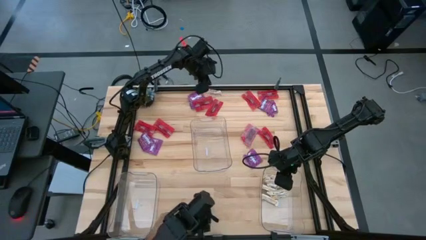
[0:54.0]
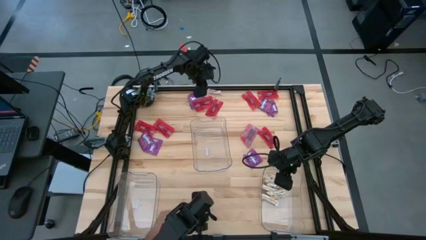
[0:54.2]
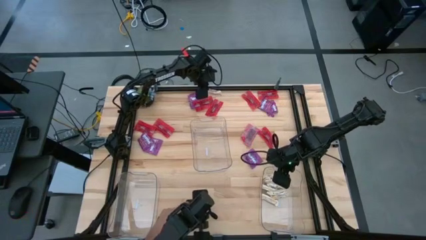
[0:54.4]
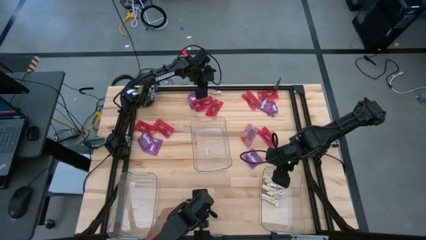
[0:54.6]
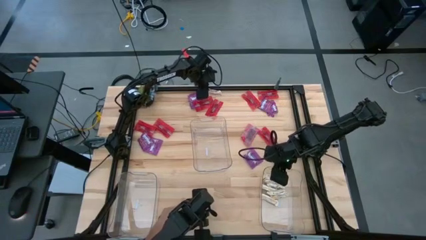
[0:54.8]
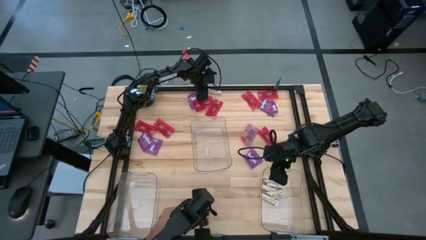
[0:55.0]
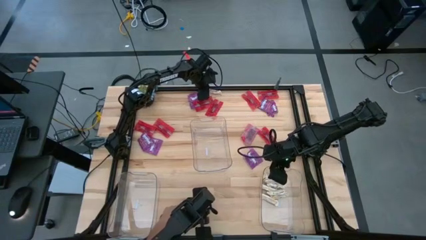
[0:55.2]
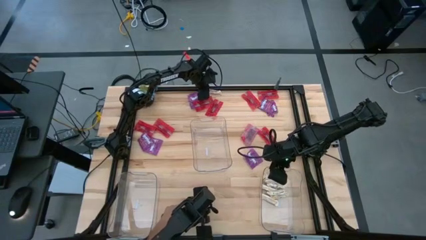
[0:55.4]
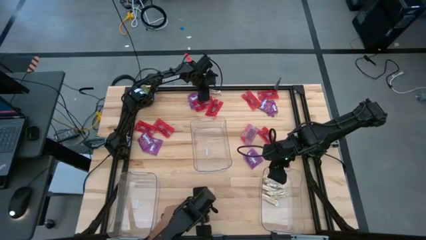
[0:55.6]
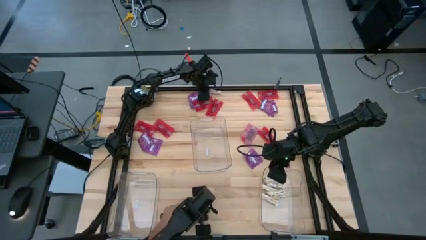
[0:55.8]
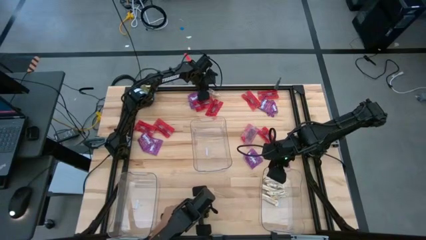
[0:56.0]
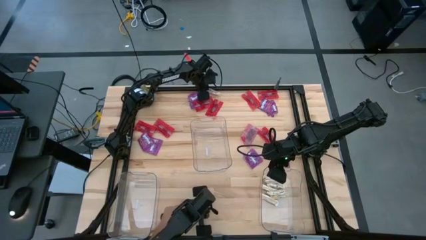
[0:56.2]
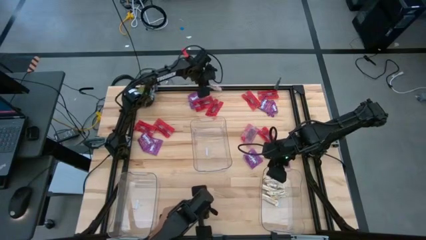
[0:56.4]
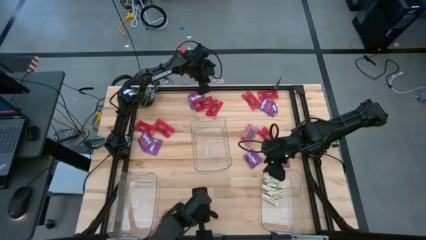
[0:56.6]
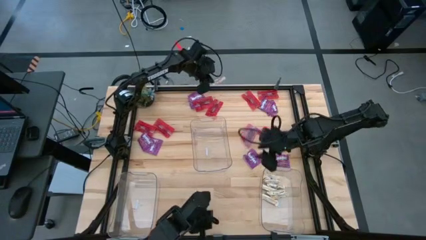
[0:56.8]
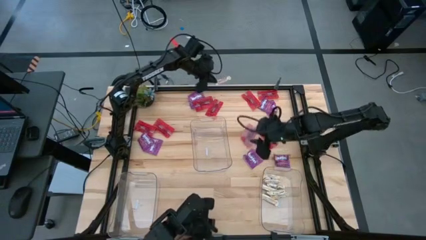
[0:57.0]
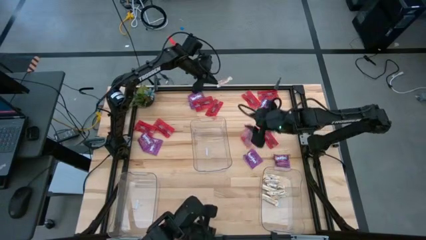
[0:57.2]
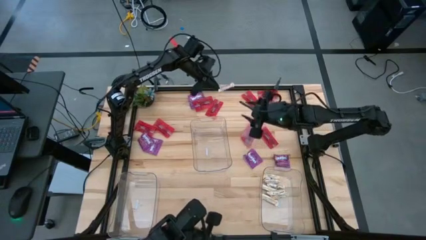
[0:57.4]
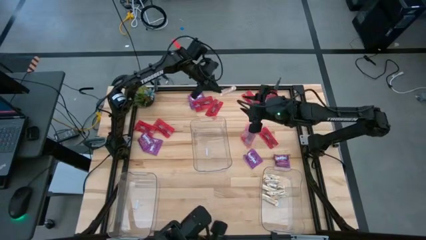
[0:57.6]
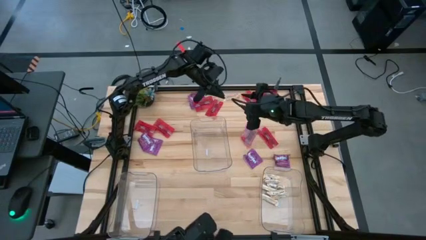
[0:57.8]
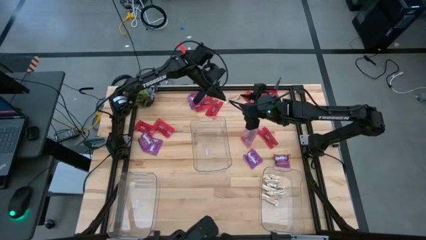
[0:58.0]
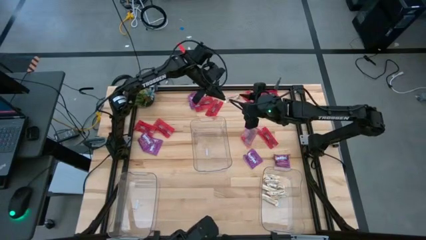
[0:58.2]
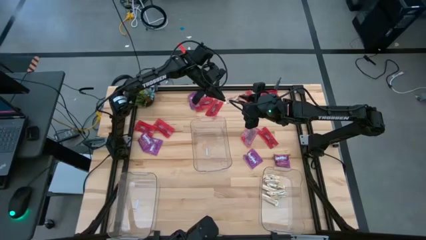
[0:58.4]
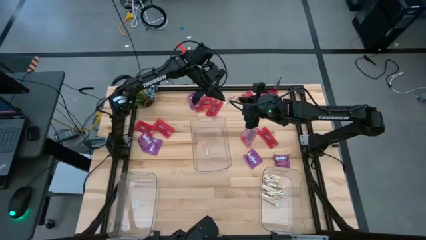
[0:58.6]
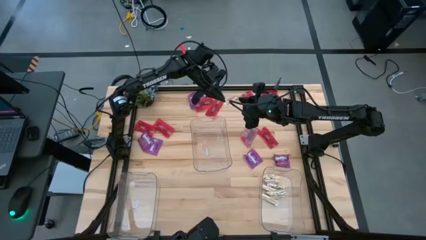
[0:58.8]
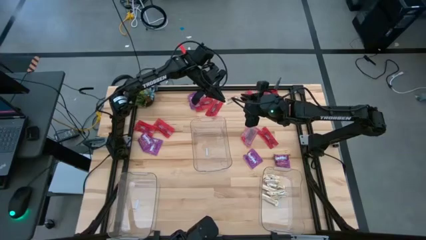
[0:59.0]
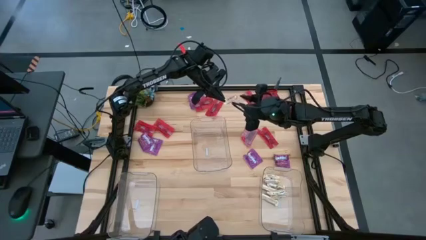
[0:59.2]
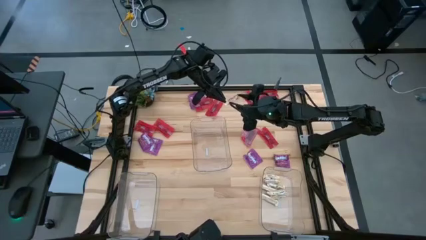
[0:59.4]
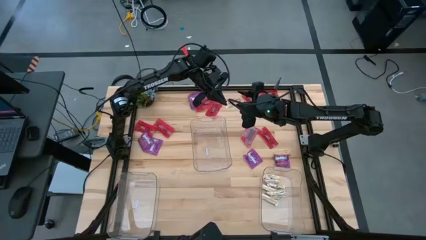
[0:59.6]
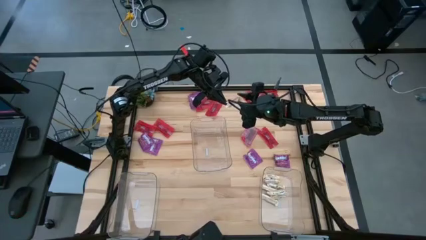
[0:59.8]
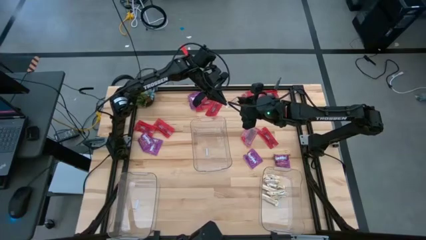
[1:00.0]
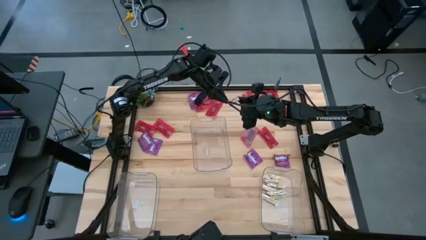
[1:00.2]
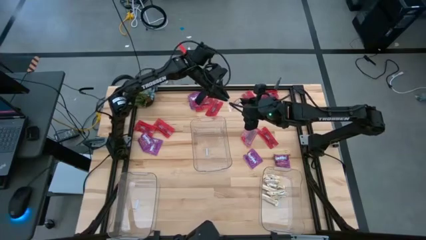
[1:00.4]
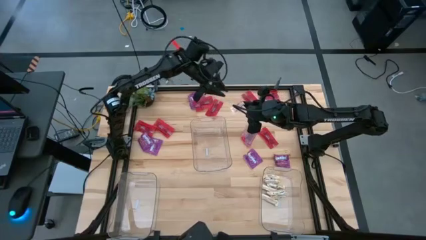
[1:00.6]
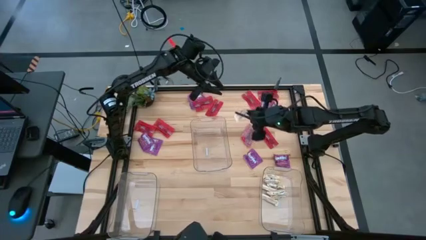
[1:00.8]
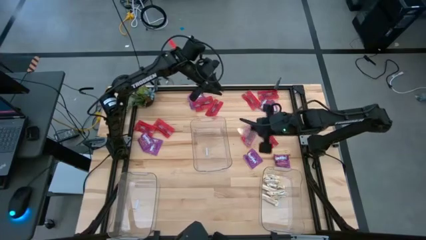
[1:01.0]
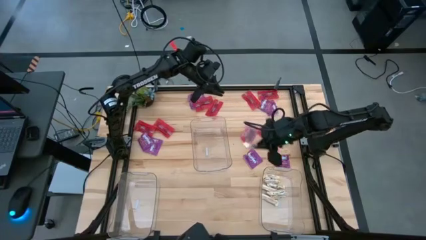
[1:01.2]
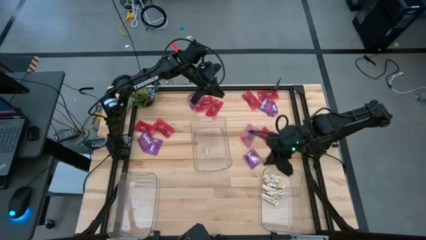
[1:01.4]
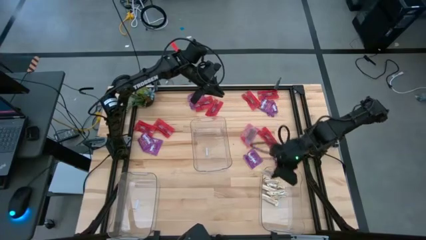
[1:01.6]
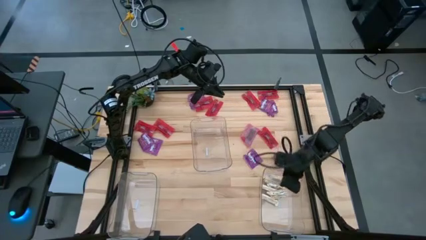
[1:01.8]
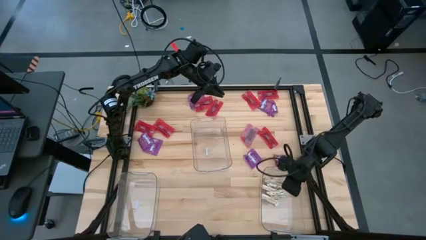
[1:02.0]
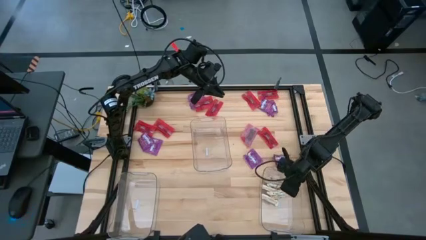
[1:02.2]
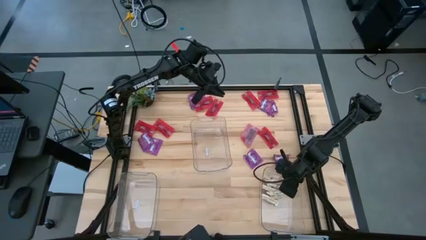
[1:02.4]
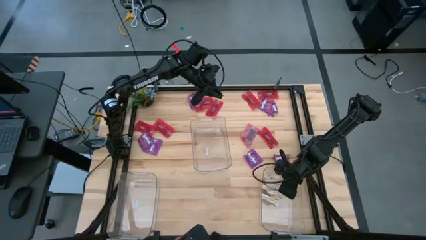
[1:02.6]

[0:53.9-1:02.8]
Task: Sort candy
Put the white chocolate bar into the right transparent bin

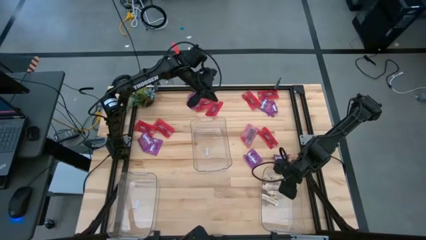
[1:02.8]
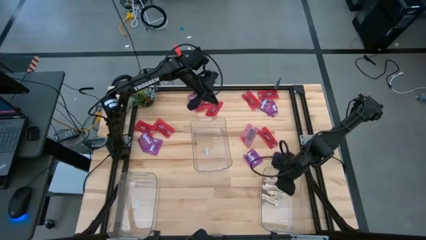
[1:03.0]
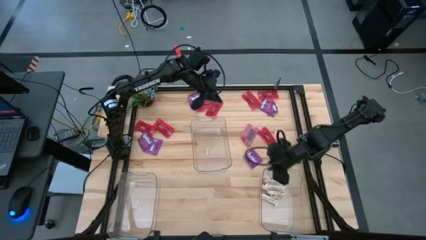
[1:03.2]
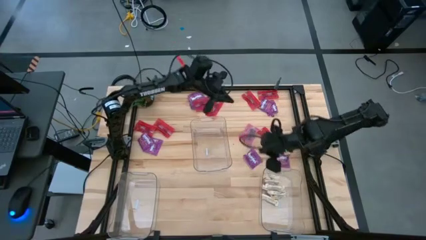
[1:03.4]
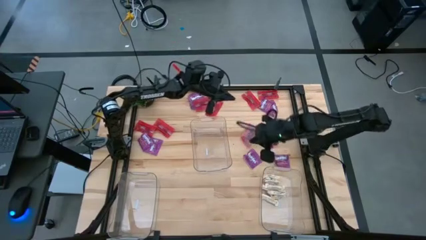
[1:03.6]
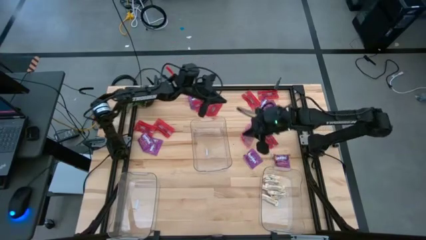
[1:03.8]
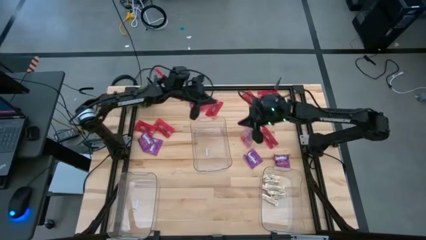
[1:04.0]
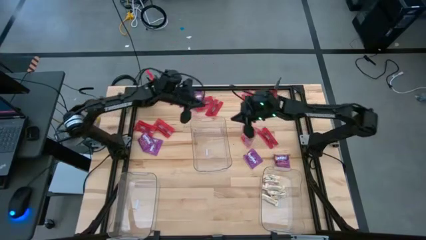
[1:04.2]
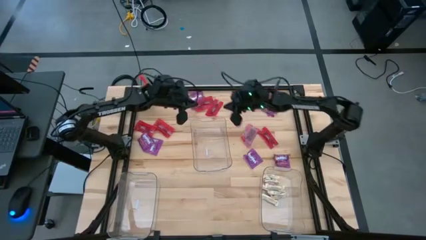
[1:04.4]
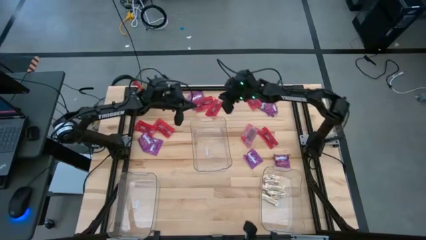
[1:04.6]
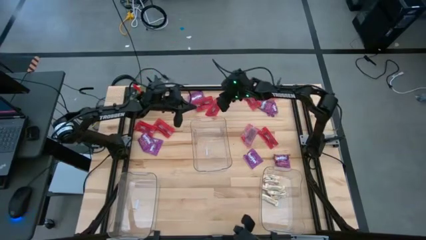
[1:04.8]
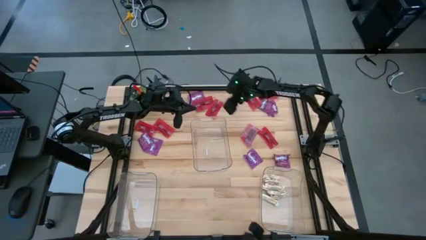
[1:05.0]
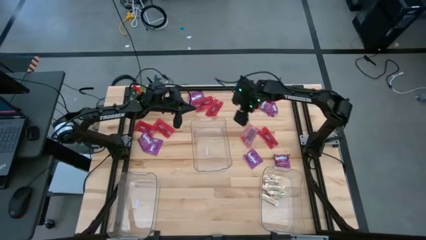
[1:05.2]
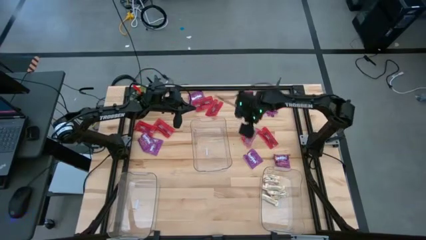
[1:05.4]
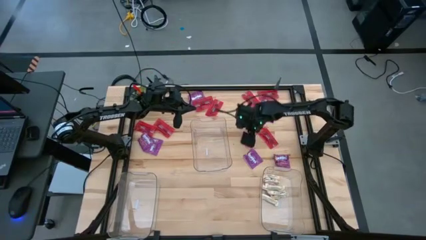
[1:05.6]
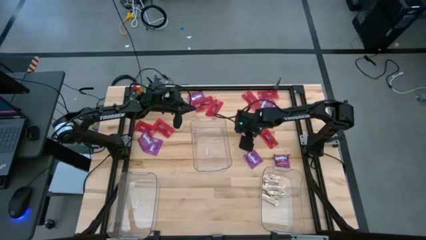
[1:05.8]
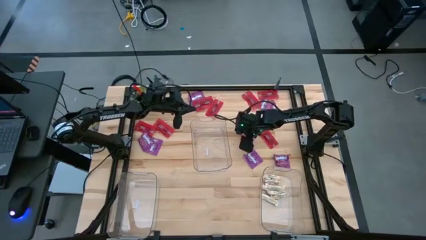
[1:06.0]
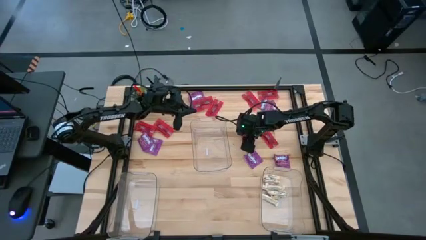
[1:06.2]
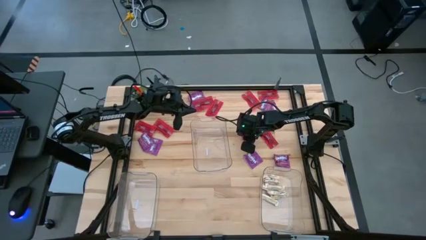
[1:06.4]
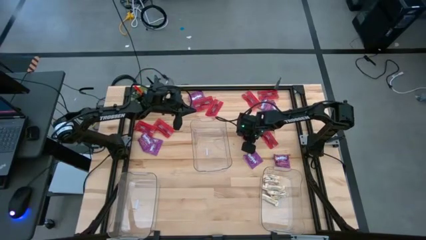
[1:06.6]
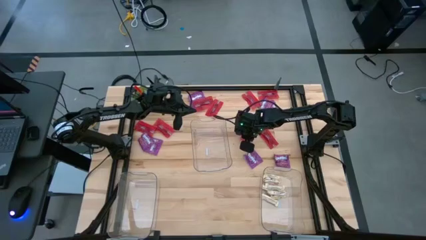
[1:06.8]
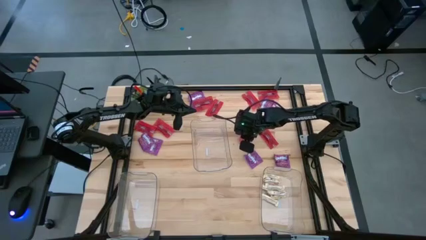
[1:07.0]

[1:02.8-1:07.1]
Put the red candy pack into the middle transparent bin

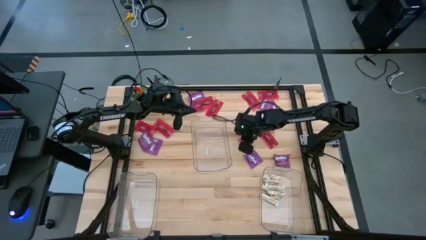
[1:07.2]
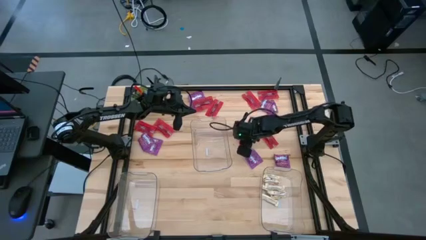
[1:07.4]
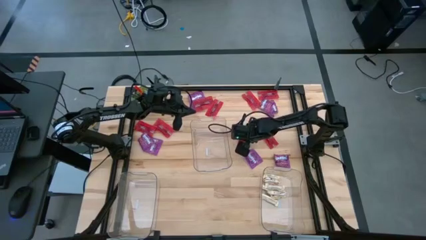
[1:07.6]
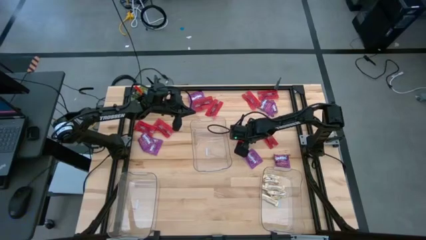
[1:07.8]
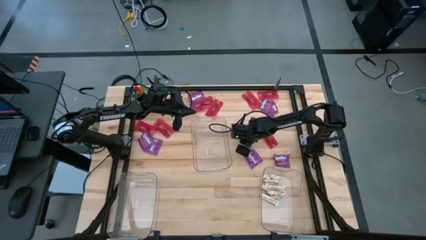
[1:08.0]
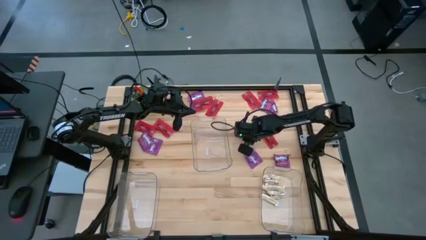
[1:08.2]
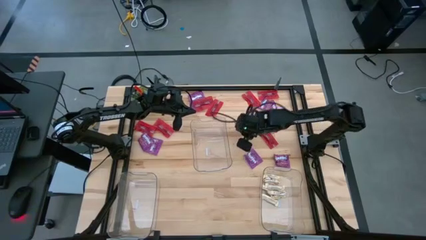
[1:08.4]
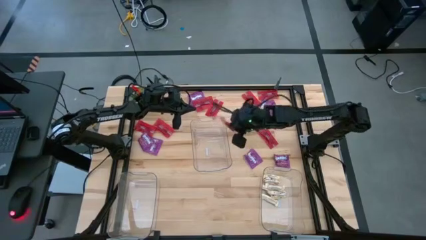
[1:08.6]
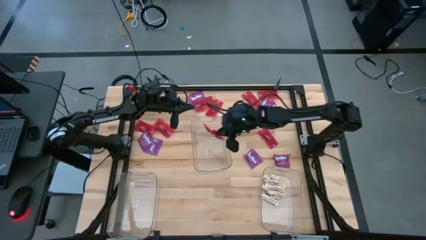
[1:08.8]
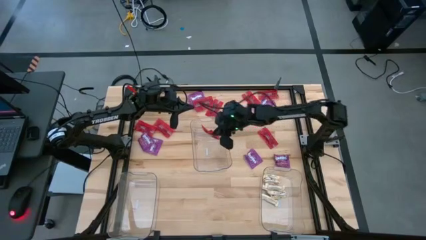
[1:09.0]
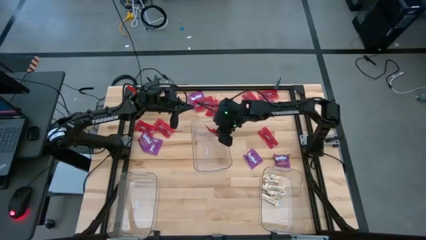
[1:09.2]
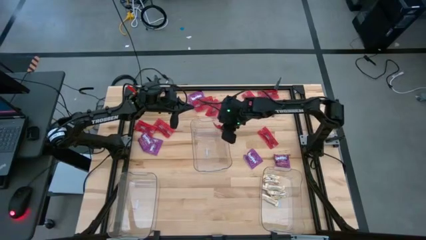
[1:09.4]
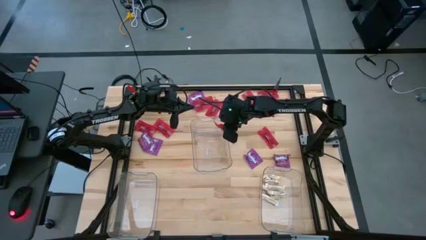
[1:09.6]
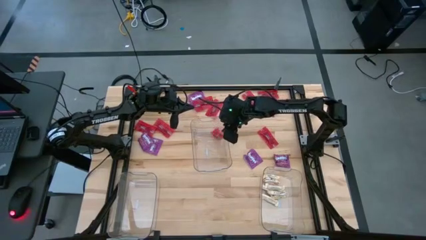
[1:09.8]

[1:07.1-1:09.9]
Put the red candy pack into the middle transparent bin

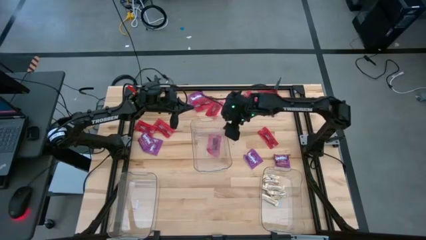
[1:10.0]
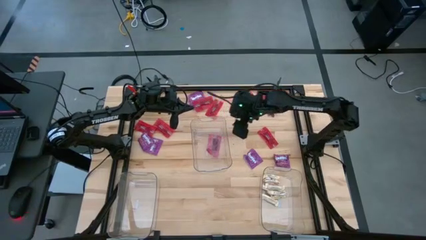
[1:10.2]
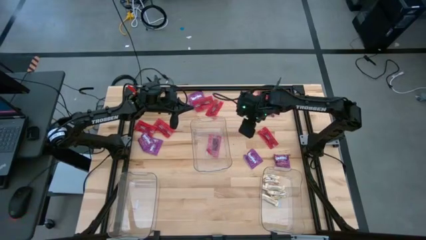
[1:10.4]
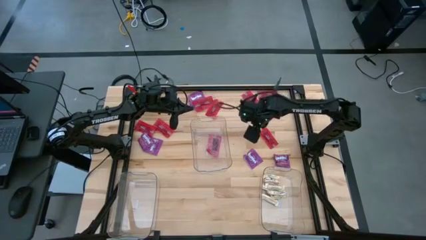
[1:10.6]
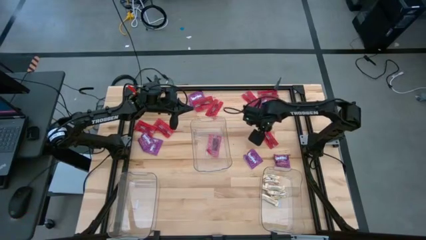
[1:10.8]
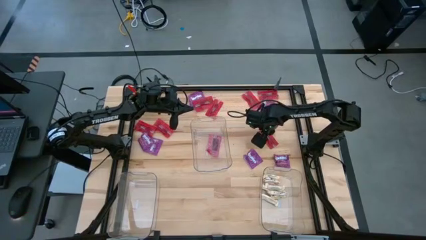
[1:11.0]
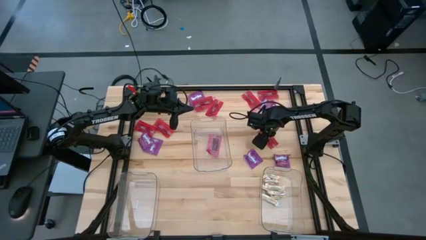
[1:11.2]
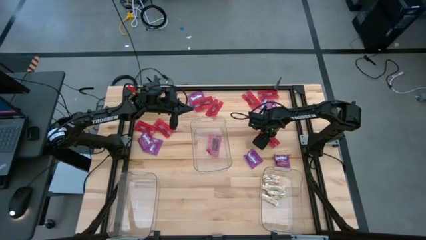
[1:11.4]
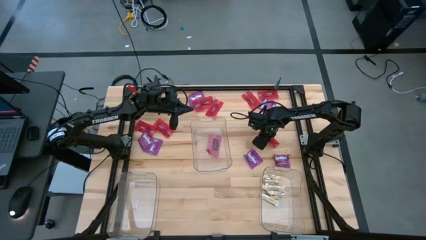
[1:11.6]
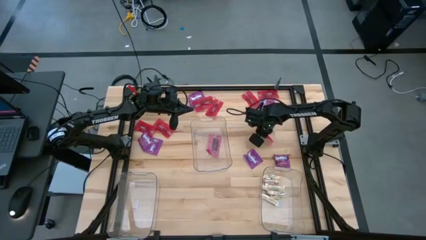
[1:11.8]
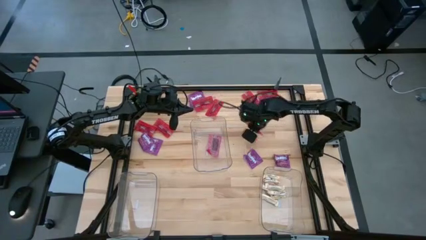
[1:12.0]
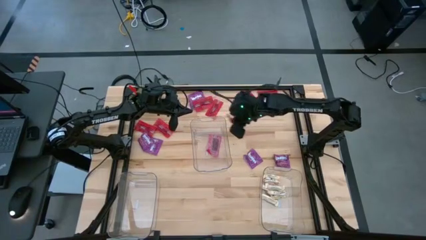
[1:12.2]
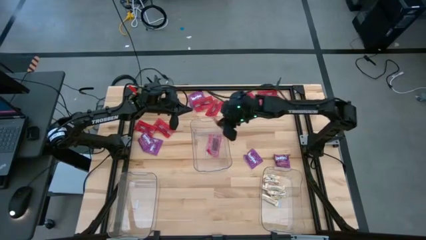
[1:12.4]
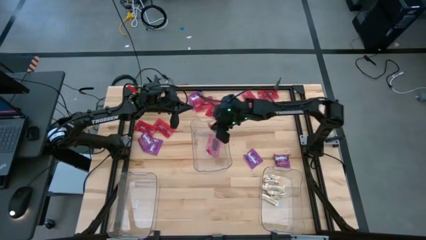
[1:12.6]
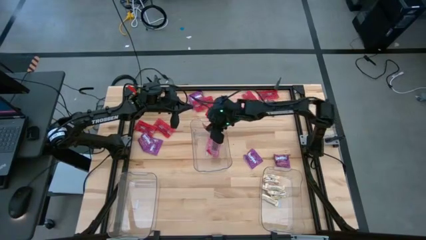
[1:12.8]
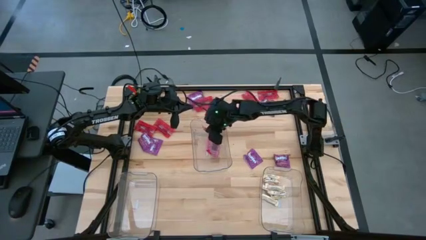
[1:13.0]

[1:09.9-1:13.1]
Put the red candy pack into the middle transparent bin
